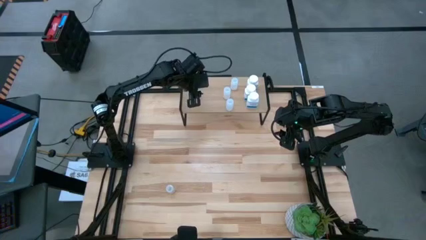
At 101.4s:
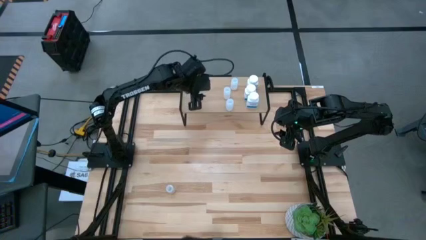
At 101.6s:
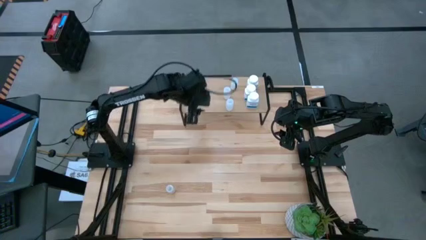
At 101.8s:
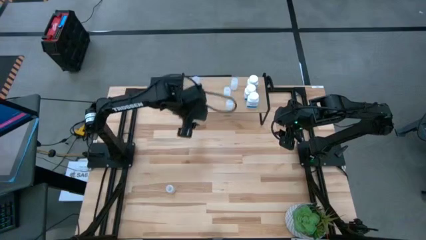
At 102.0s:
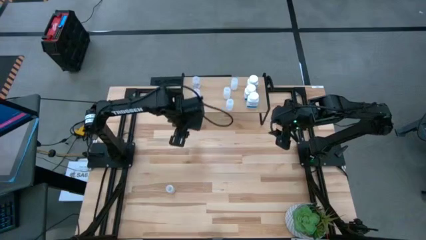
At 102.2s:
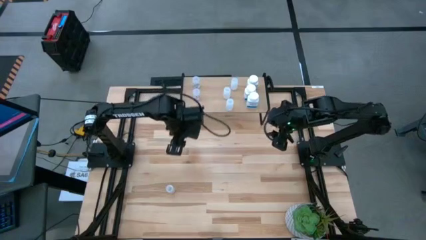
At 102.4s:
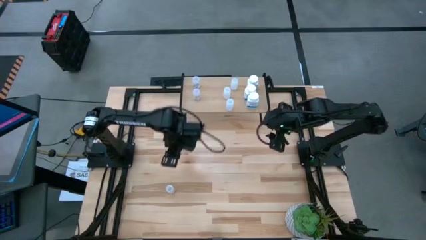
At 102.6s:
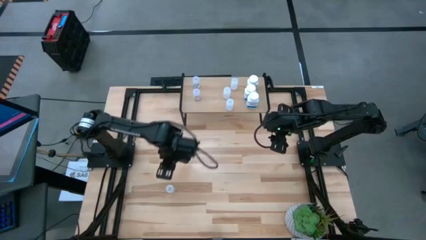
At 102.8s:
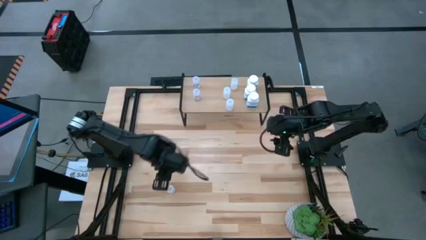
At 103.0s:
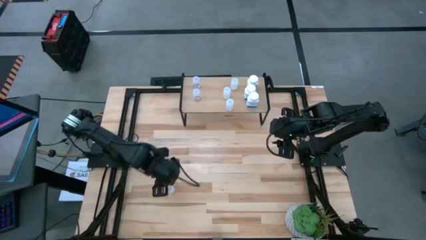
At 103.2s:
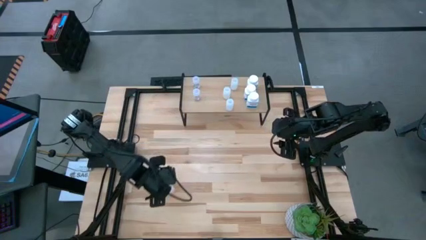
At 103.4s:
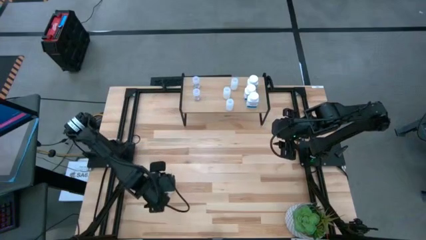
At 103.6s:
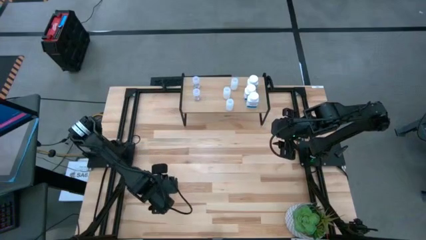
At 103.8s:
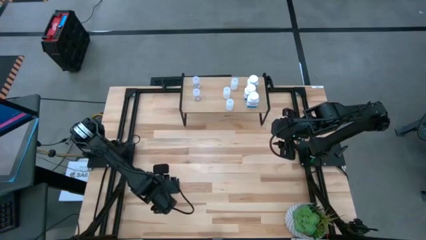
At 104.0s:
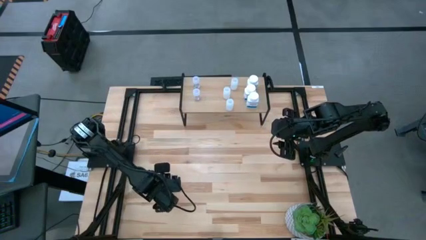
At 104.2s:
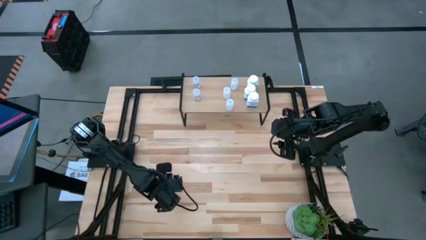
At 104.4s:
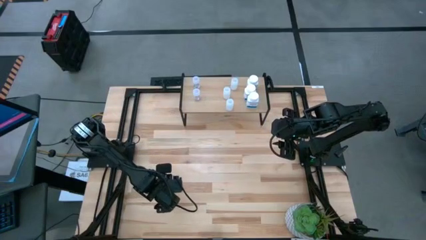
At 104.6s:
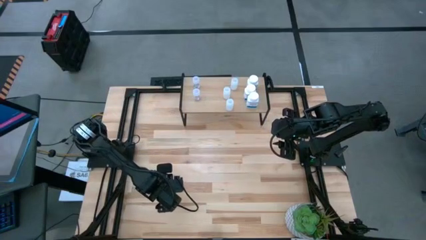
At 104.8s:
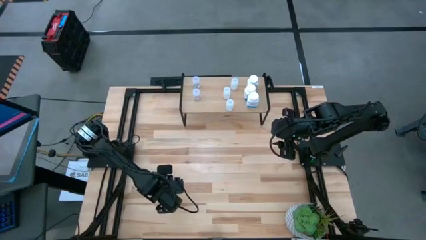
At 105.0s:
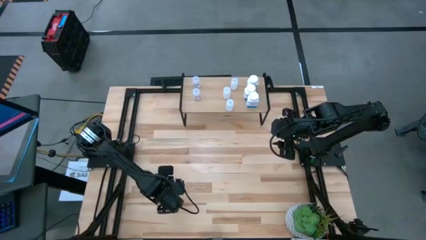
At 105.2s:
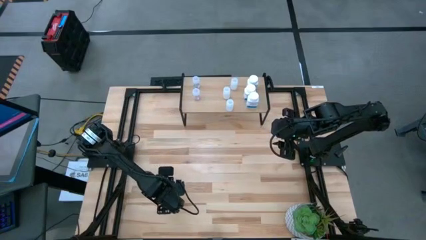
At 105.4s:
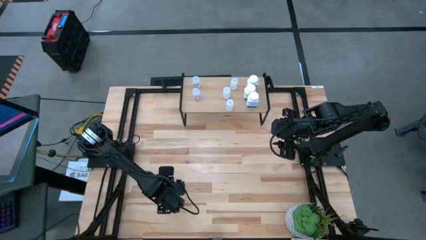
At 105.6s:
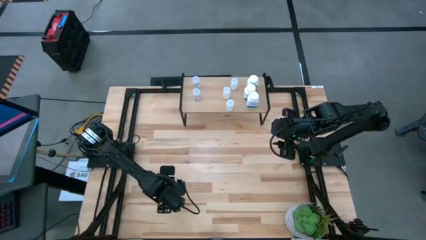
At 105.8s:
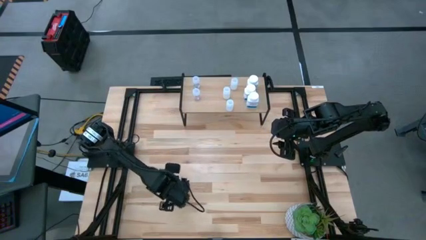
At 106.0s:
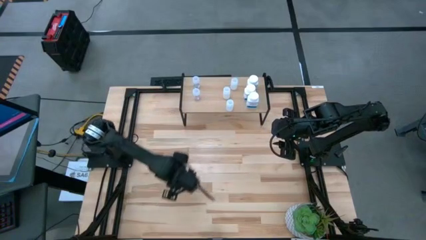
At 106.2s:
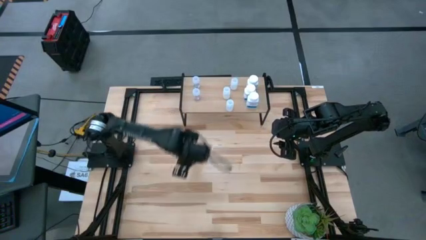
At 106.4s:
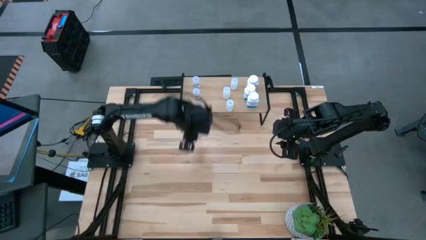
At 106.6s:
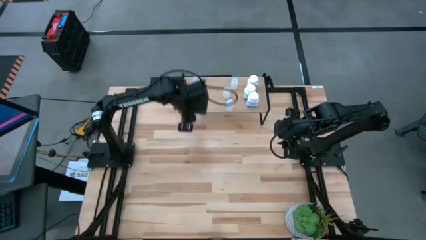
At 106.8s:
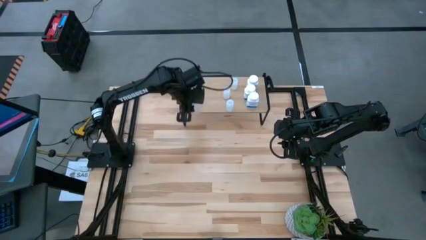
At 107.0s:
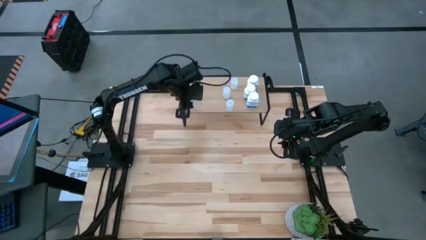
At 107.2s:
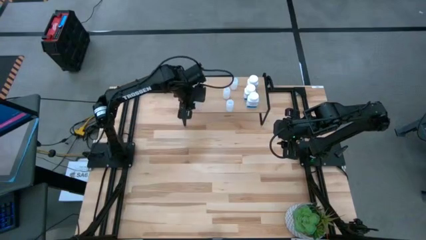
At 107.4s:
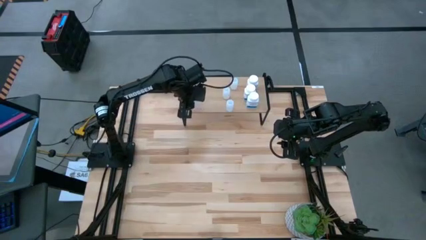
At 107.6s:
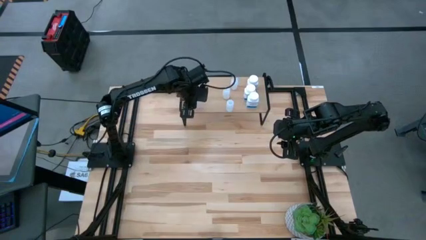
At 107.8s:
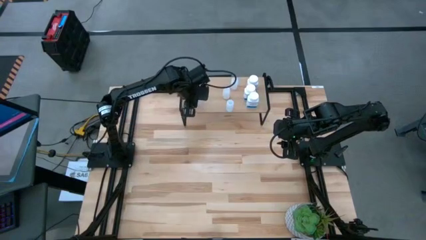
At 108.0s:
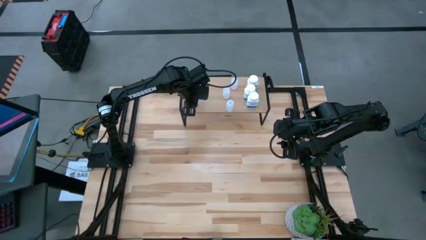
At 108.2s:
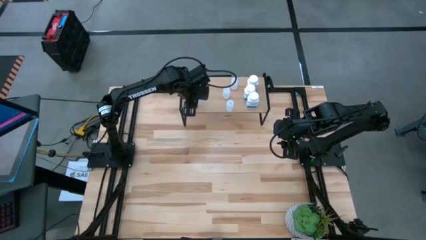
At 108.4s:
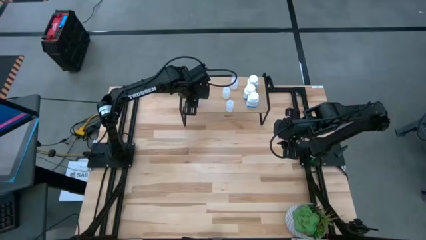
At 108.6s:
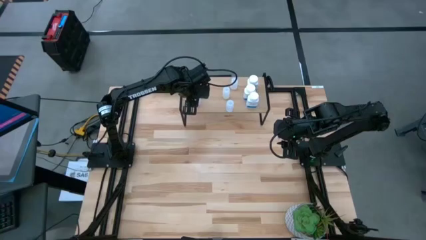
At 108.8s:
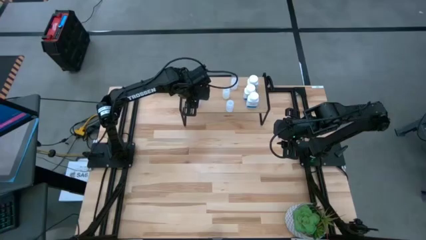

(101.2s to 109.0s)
Task: Pick and place medicine bottles onto shelf by color
Put the transparent pill bottle on the shelf aligned with the other small pill bottles

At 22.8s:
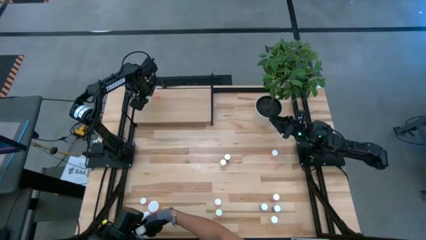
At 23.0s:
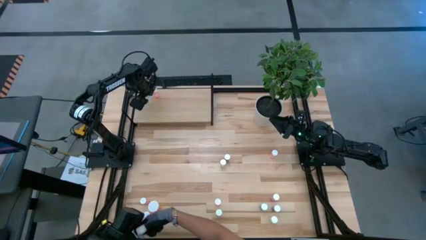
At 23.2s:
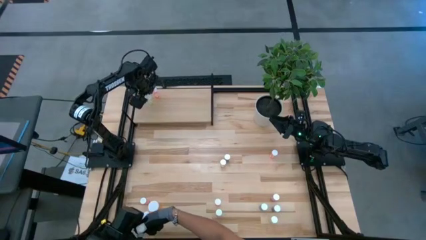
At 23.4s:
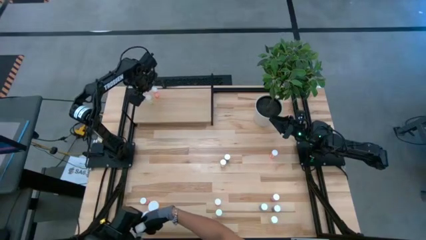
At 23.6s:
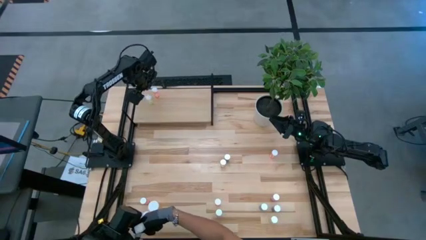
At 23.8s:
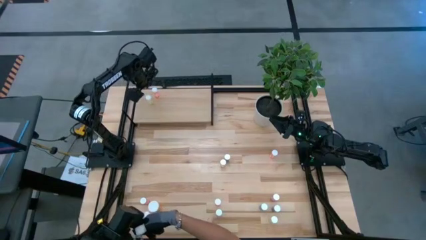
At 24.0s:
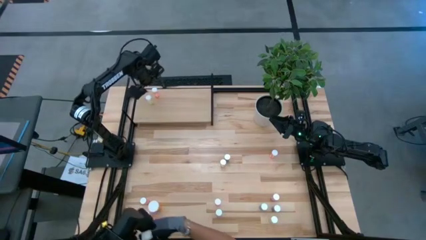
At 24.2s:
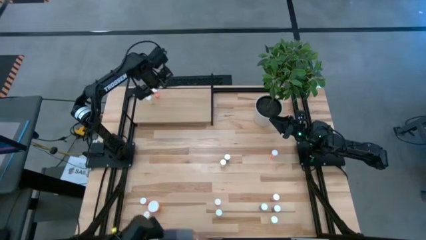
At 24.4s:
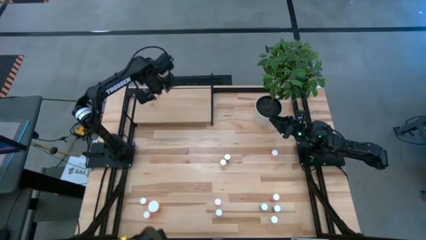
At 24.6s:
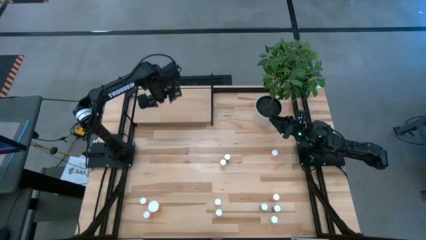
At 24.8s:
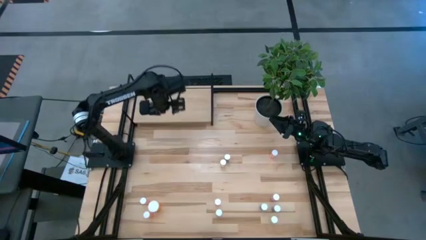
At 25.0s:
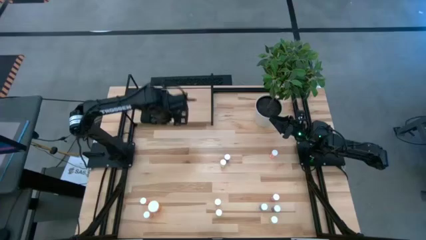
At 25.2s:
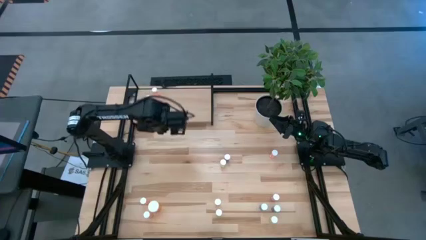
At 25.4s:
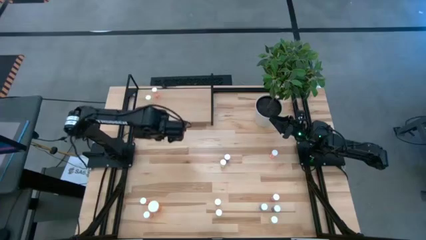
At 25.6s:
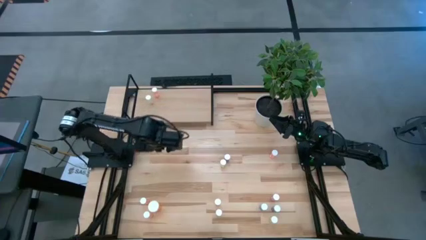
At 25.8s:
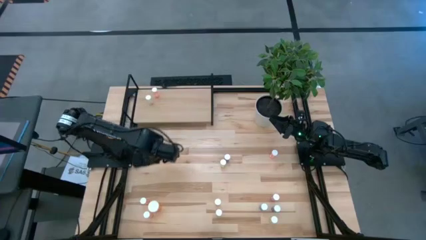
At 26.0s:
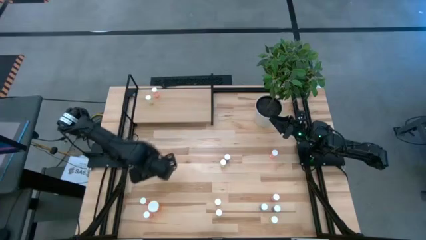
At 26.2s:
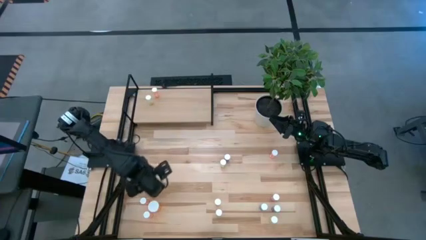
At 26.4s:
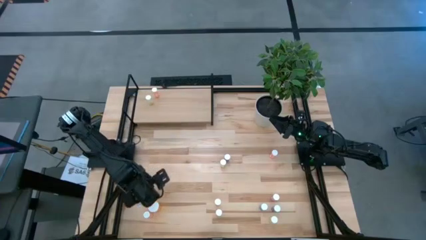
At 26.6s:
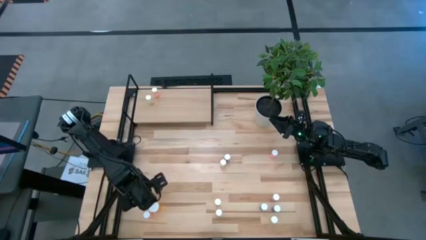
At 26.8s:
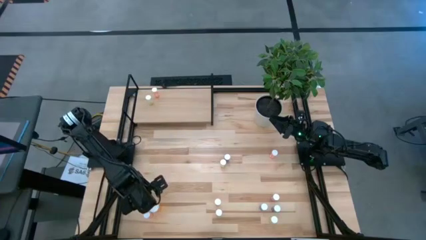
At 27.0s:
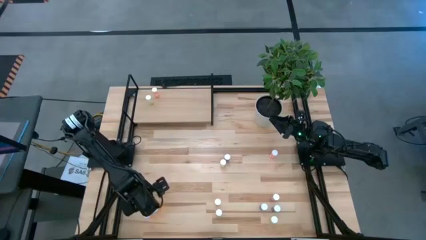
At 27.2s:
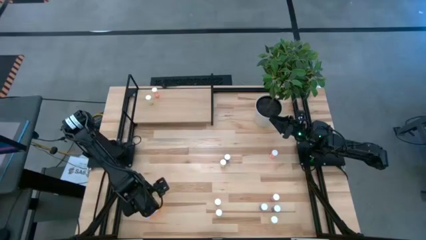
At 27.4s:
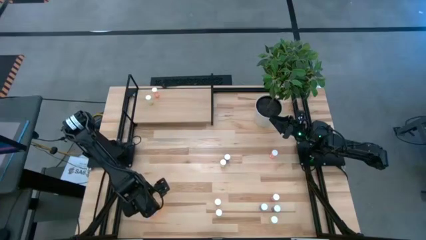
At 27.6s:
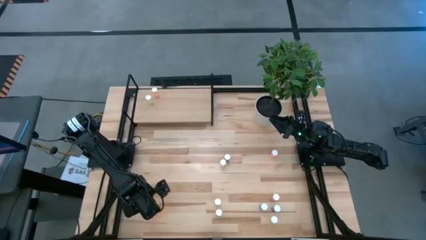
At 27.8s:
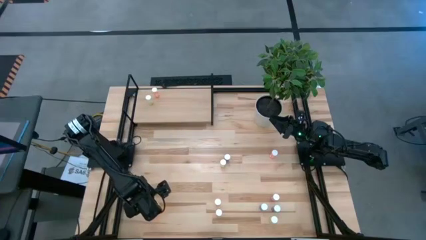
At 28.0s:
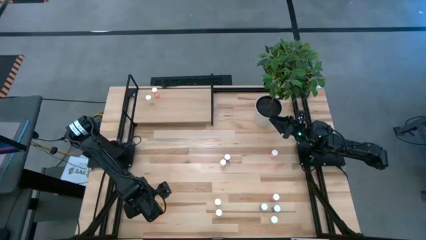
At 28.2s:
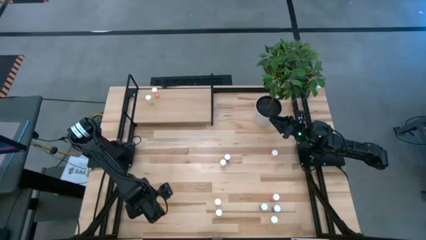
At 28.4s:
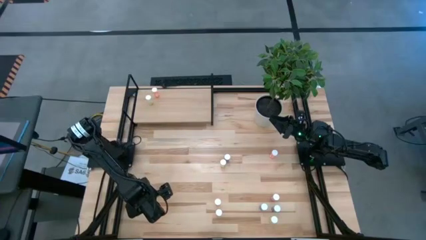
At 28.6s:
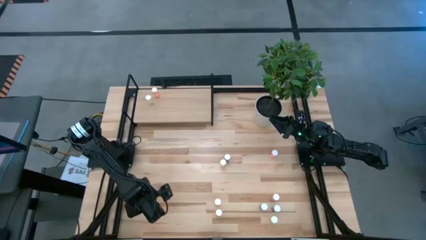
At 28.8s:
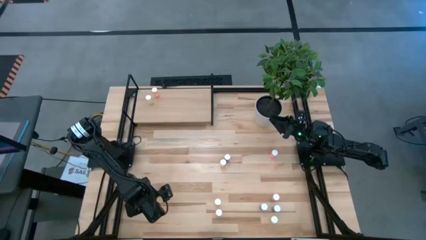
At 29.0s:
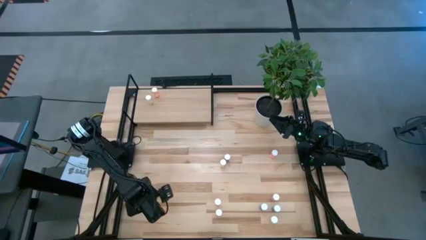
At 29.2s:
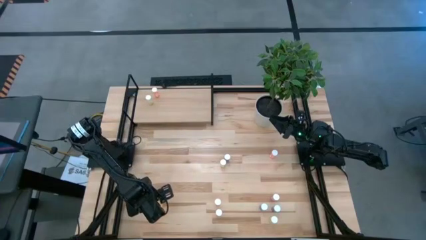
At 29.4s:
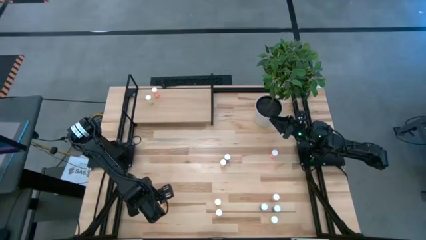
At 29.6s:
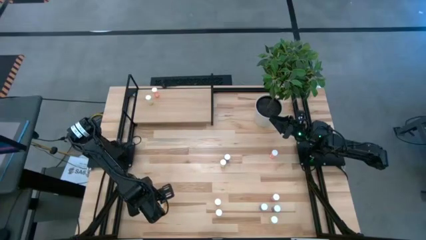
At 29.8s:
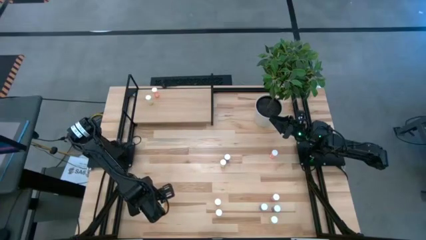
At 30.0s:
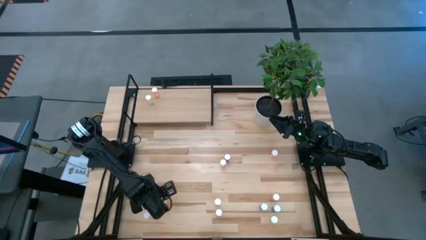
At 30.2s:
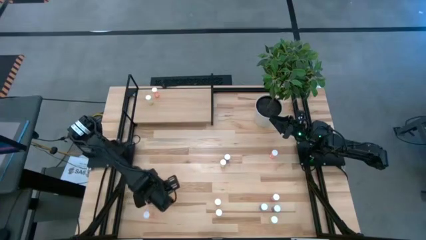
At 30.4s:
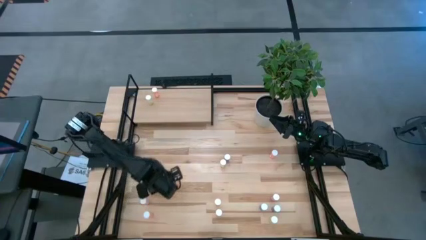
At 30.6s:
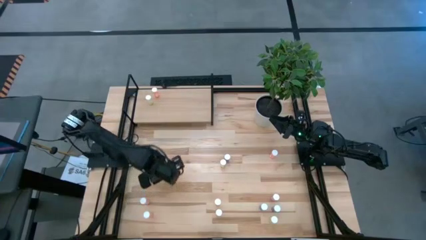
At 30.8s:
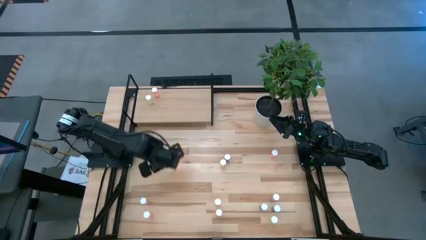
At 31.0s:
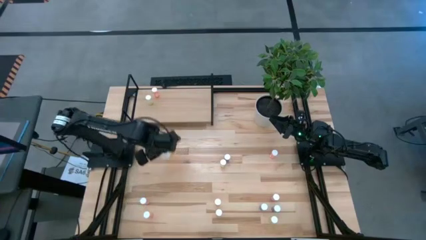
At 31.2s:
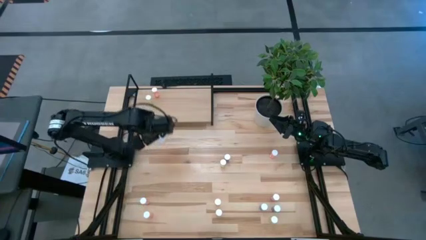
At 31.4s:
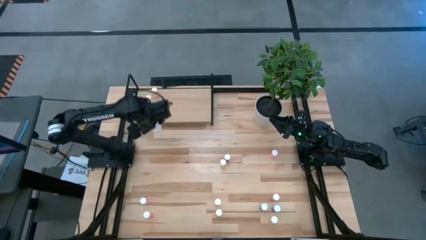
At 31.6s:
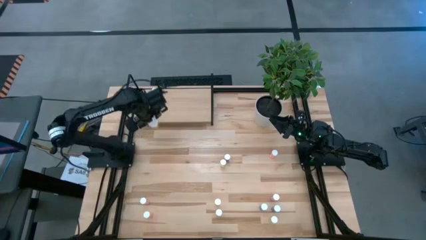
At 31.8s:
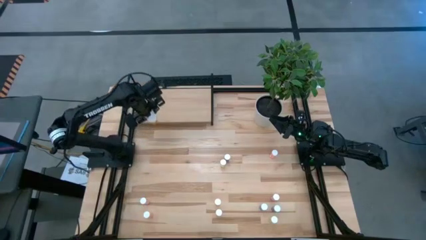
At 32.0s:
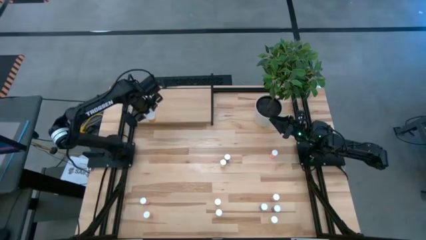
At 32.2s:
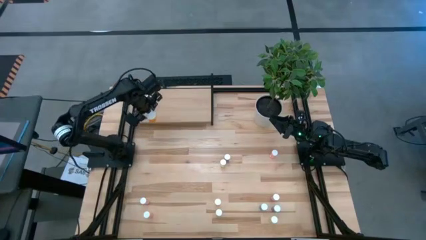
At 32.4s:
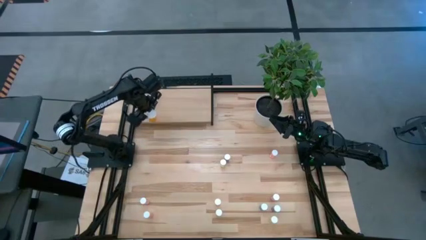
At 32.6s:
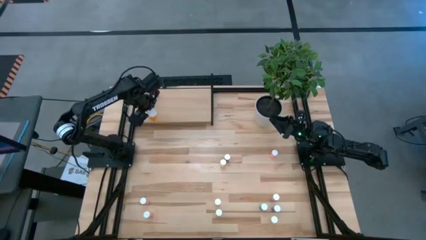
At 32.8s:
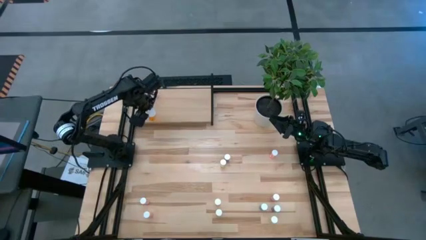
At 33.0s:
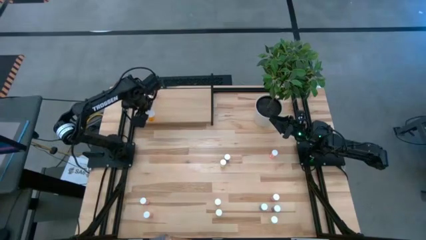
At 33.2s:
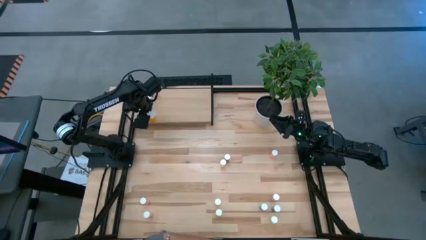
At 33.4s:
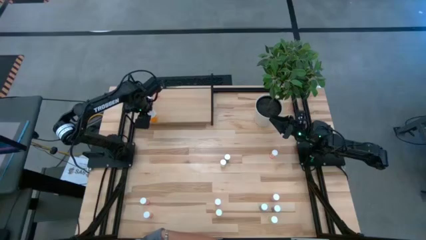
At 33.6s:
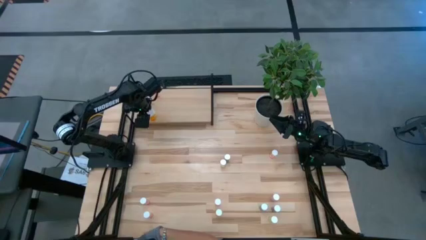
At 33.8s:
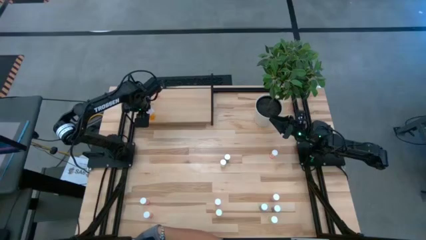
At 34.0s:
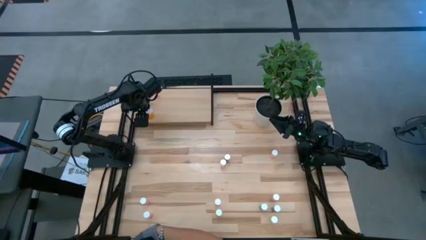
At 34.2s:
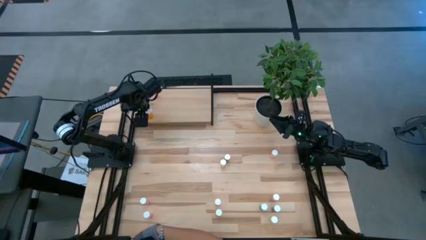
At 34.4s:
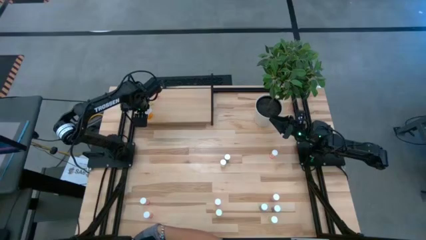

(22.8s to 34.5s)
Task: Pick and place medicine bottles onto shelf by color
Put the big orange pill bottle on the shelf
